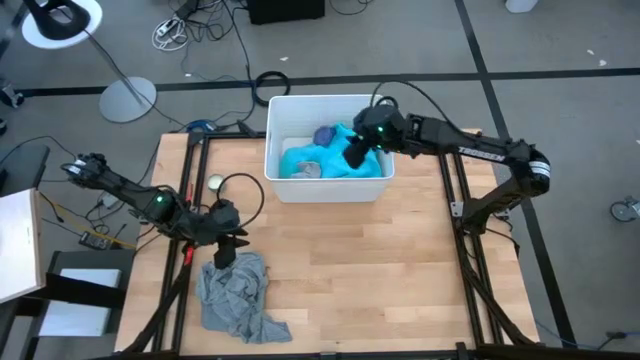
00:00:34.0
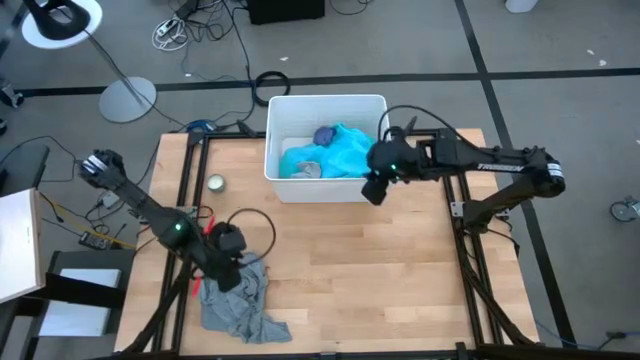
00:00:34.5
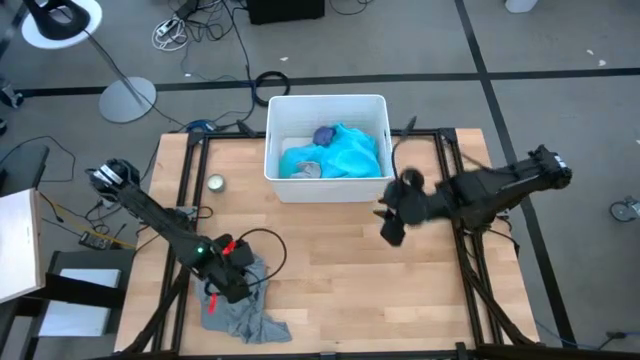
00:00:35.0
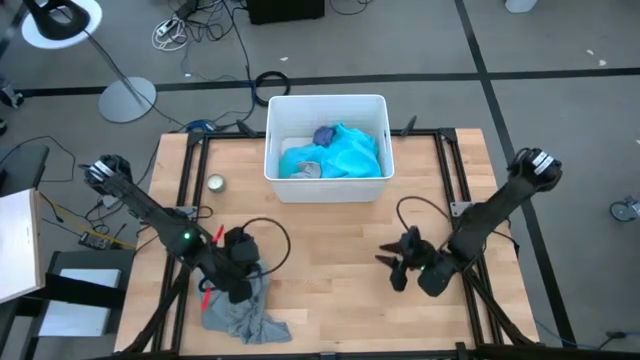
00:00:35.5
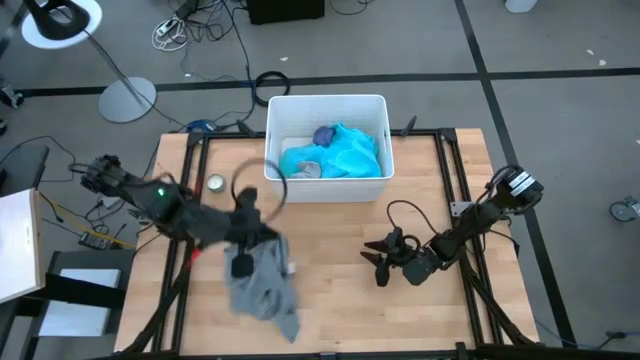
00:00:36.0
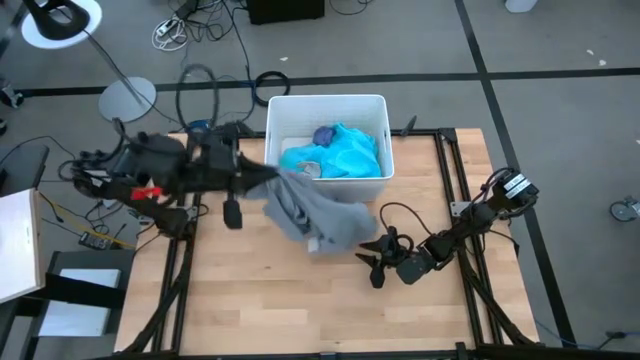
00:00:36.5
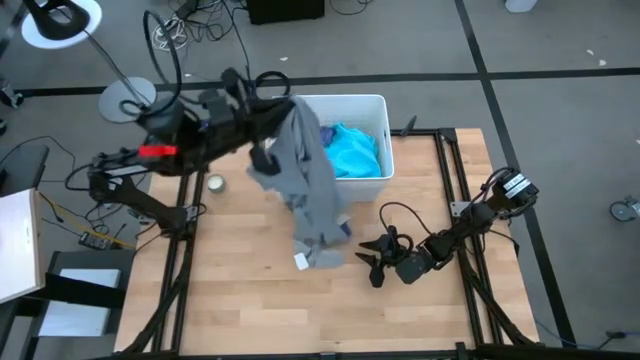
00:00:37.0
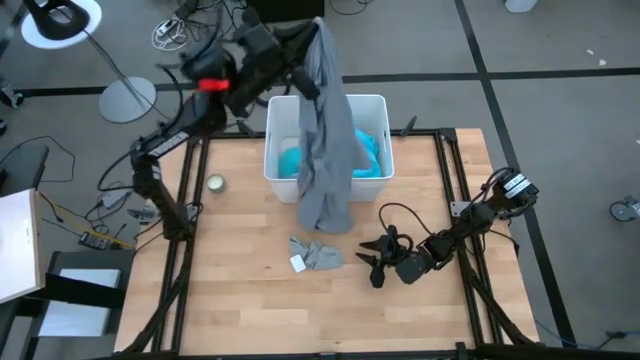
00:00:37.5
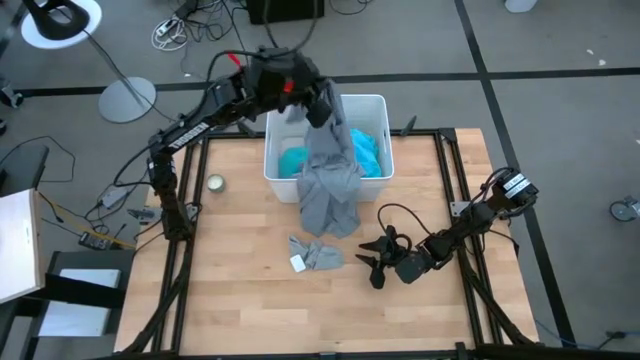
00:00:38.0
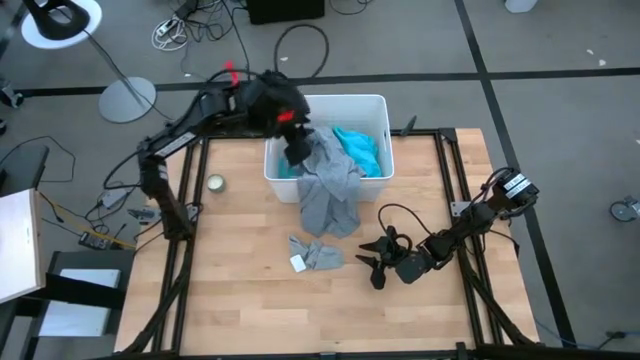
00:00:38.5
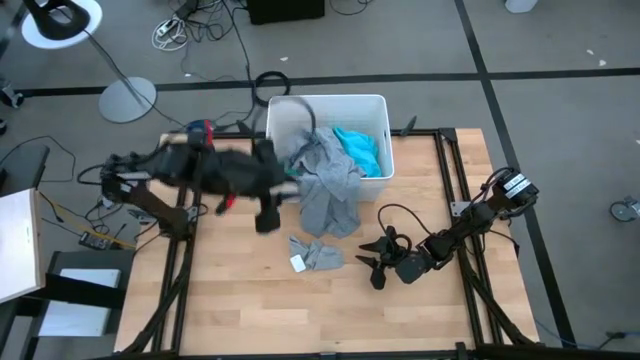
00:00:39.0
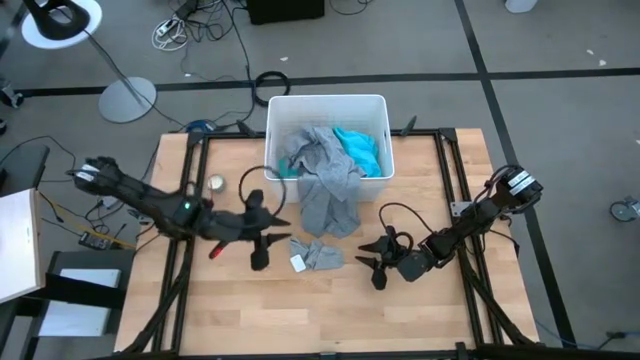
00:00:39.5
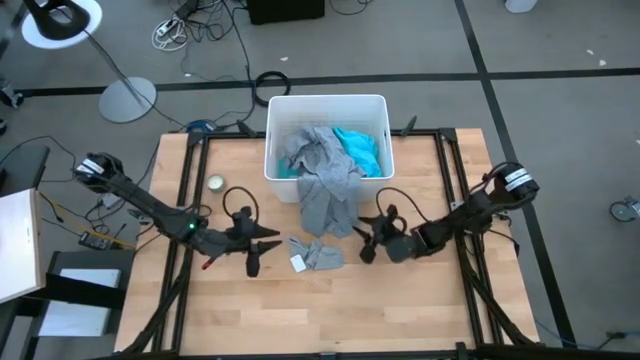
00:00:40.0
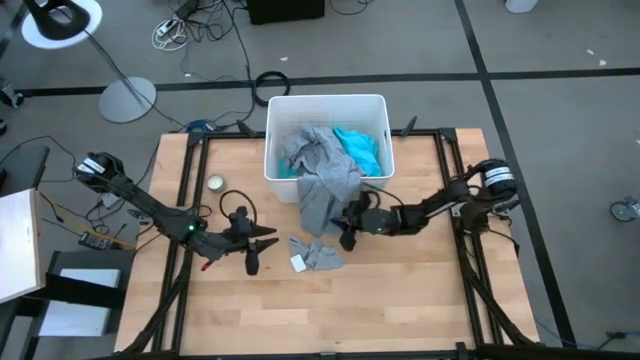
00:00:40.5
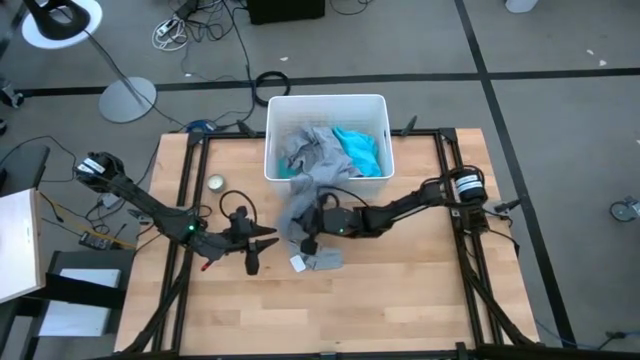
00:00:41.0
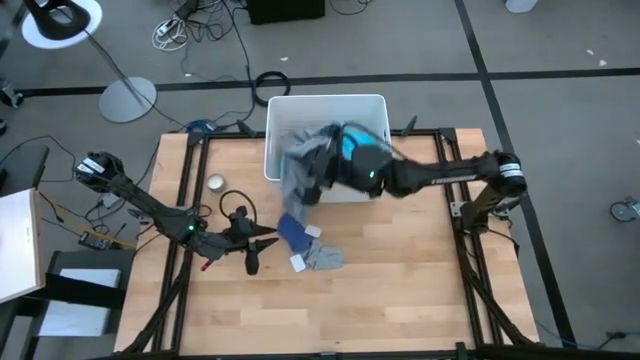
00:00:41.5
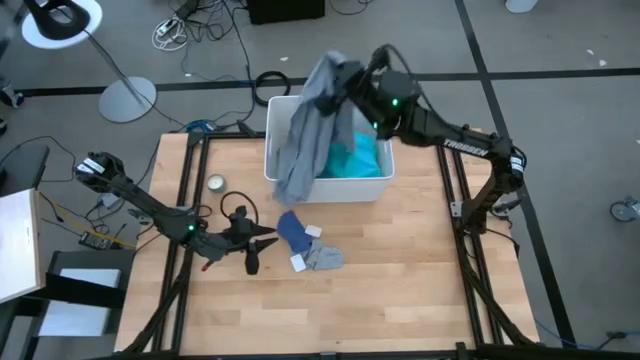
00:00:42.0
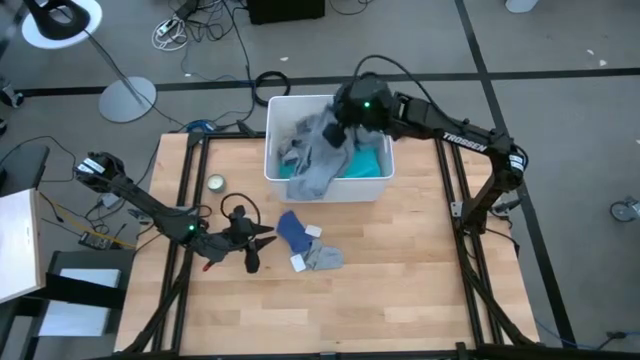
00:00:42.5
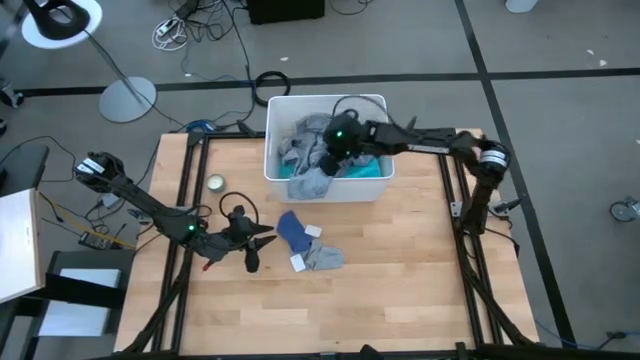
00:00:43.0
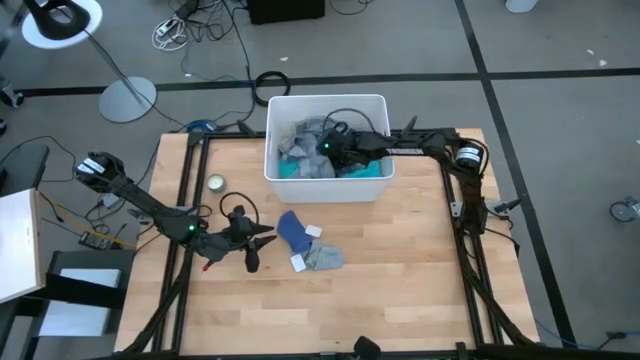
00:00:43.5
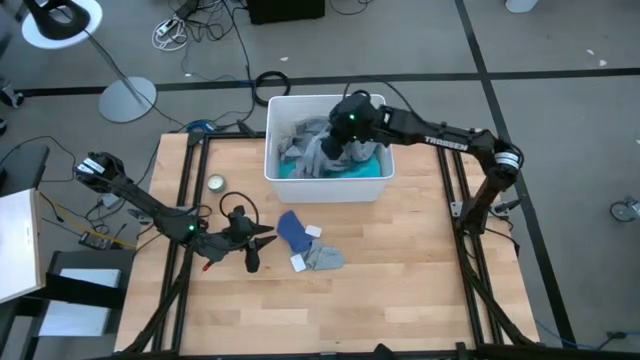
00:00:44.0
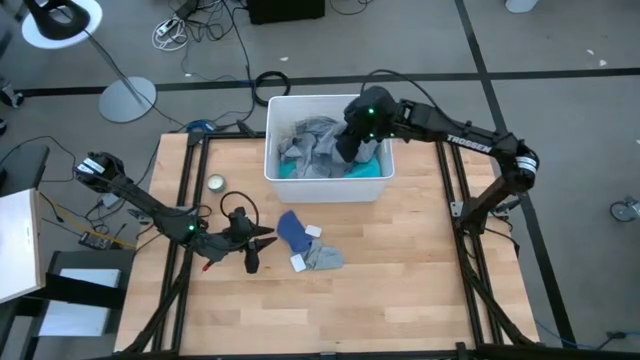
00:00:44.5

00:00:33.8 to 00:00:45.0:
Task: Sort clothes
Put the gray shirt into the white laundry bin

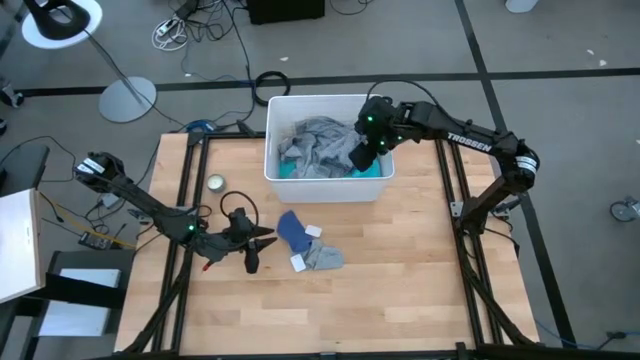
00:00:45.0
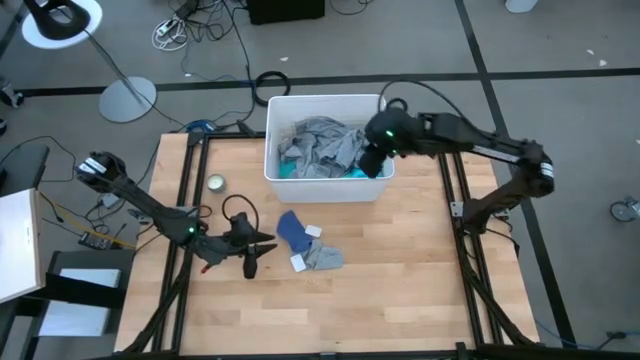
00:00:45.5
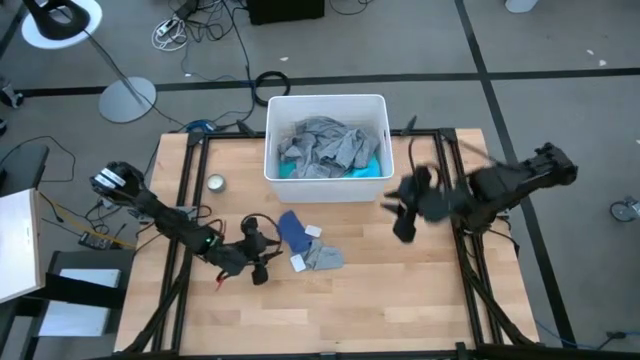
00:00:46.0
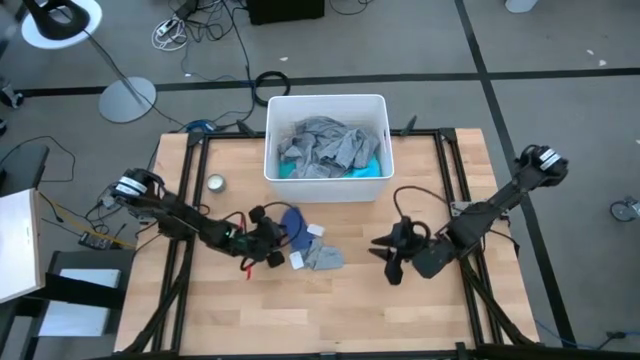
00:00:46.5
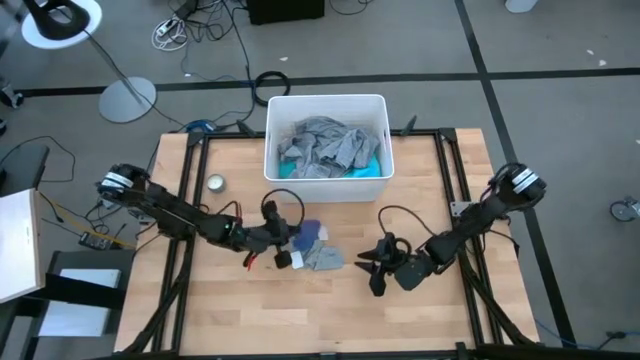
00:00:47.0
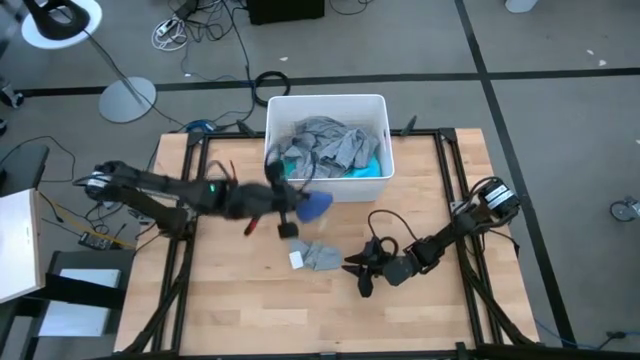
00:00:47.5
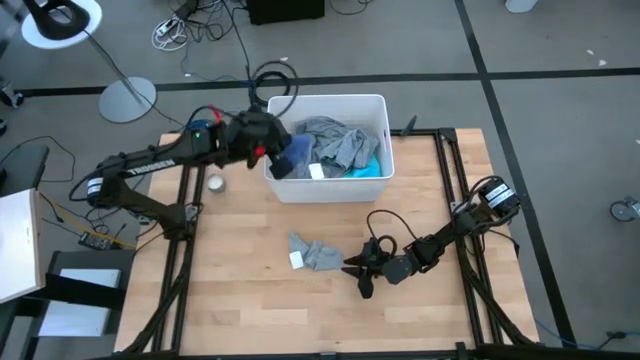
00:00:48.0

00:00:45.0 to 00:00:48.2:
Put the purple sock into the white laundry bin

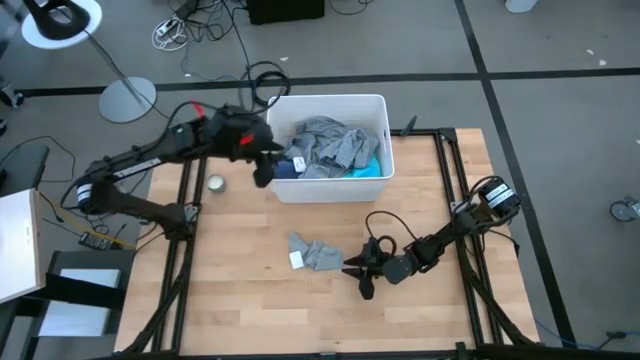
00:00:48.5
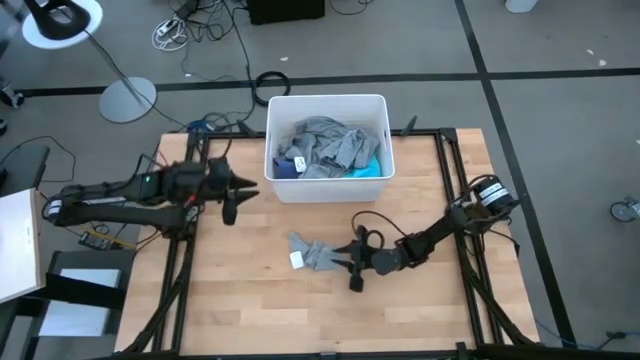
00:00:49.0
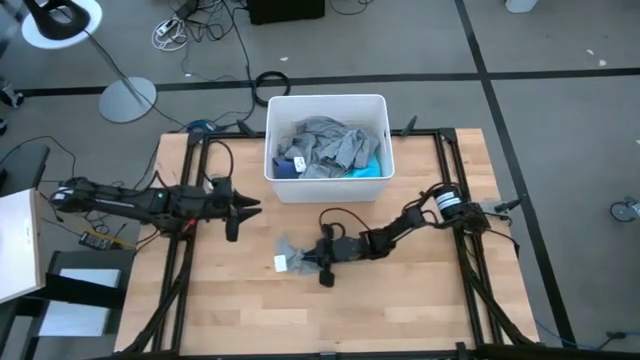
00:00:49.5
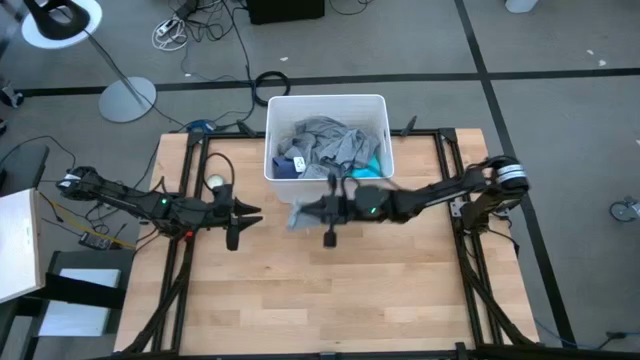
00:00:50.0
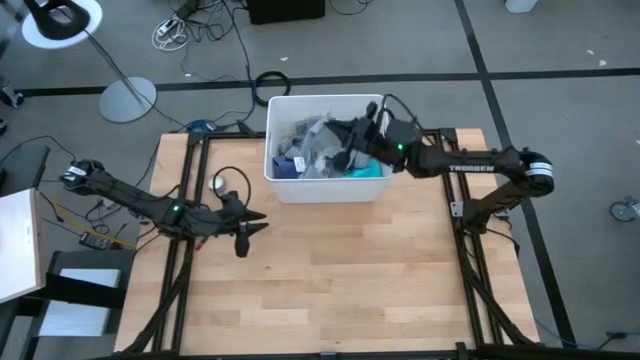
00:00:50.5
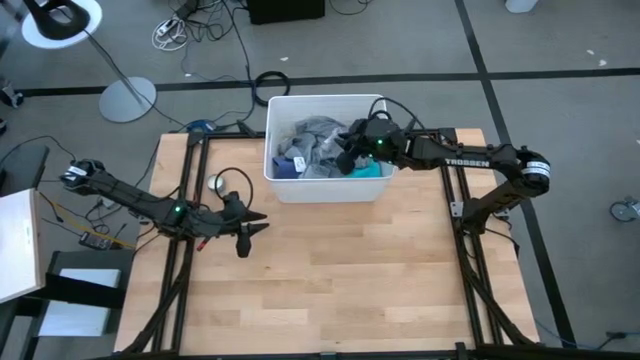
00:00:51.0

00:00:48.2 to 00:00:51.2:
Put the gray sock into the white laundry bin

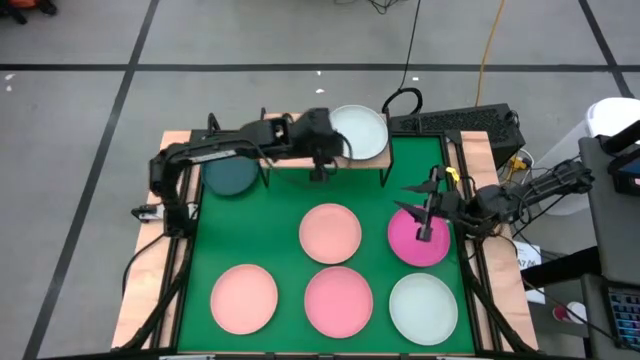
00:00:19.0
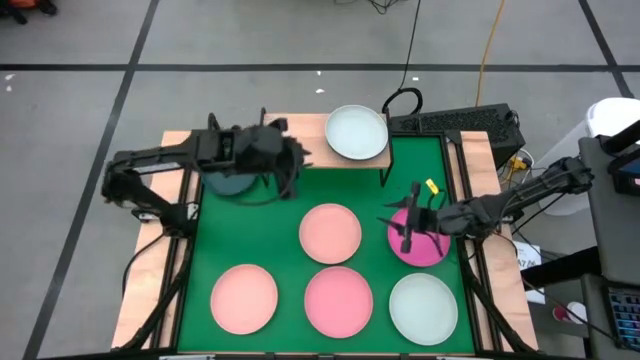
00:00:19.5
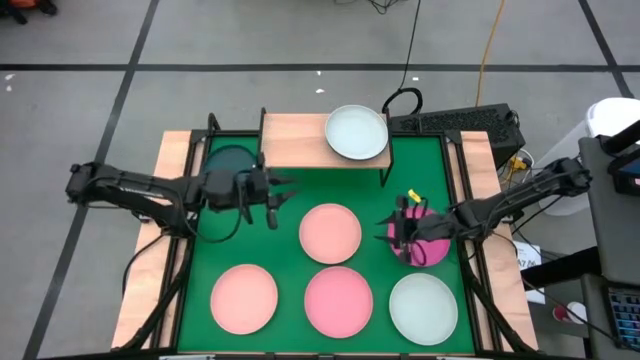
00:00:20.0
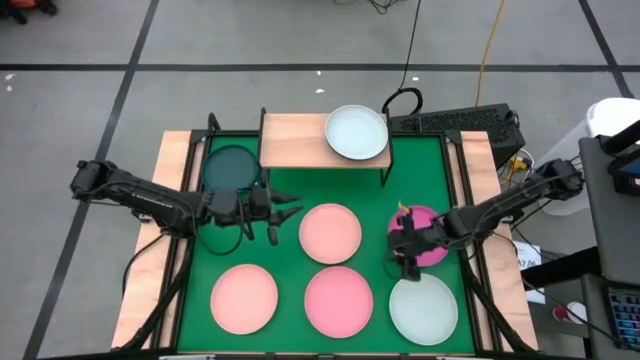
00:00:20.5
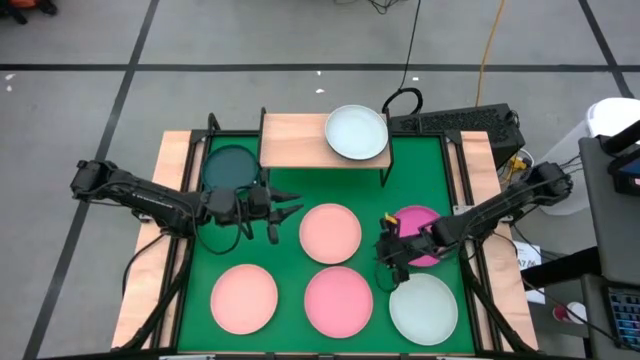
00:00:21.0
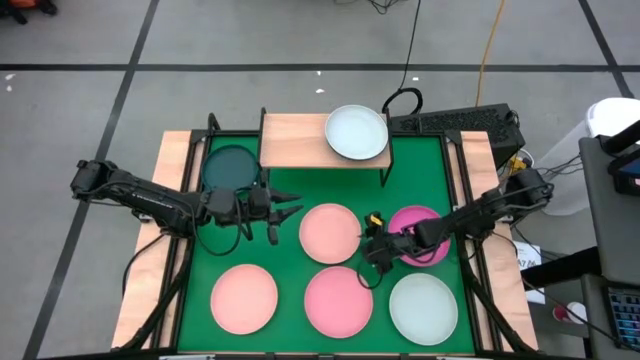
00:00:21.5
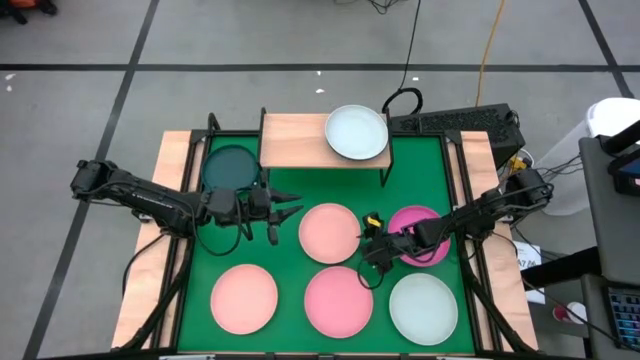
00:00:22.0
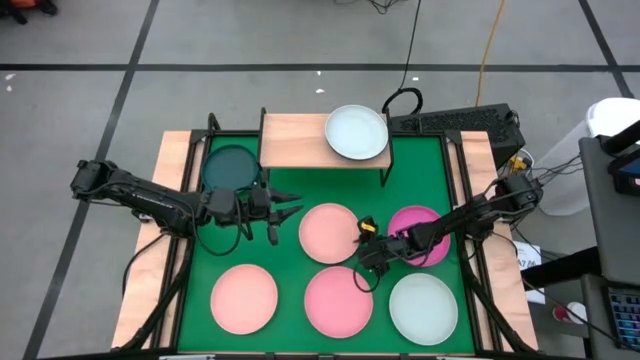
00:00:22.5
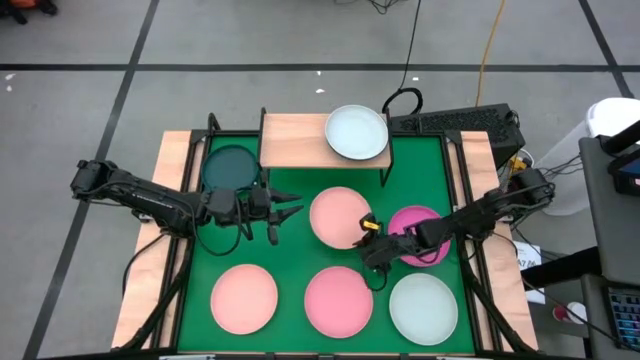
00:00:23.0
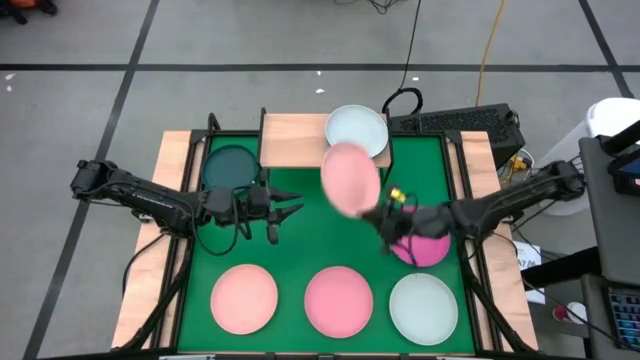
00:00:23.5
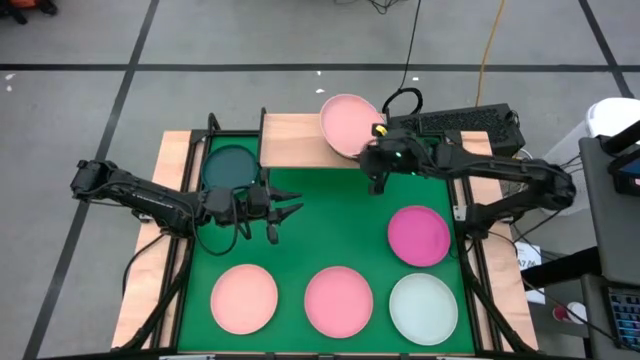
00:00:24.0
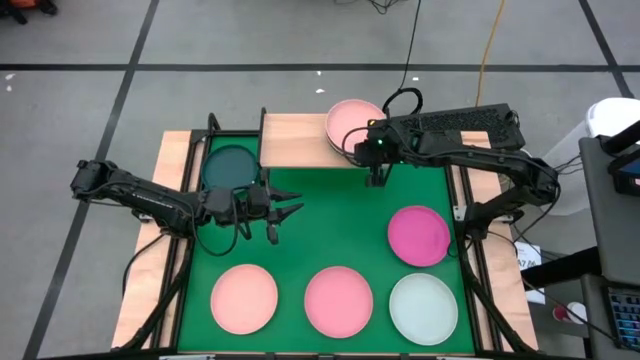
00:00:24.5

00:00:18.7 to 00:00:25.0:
Task: Place and stack plates onto a shelf
Stack the top light orange plate on top of the white plate on the shelf
